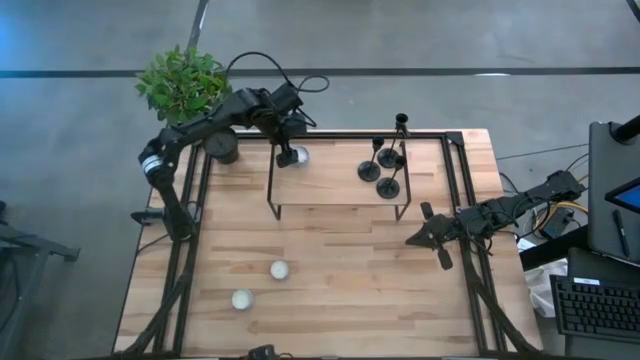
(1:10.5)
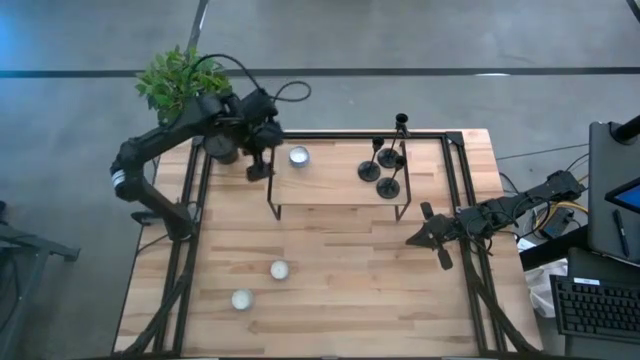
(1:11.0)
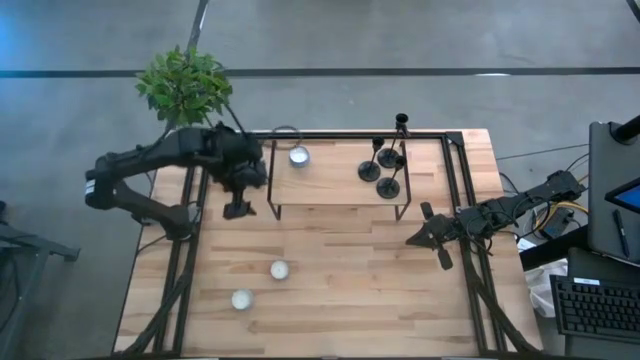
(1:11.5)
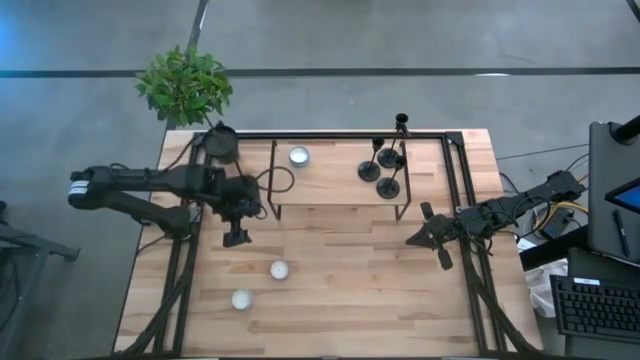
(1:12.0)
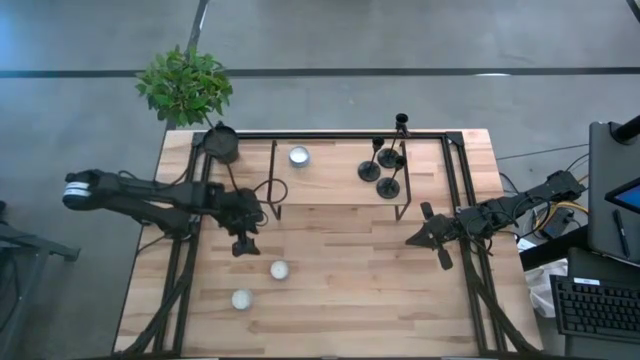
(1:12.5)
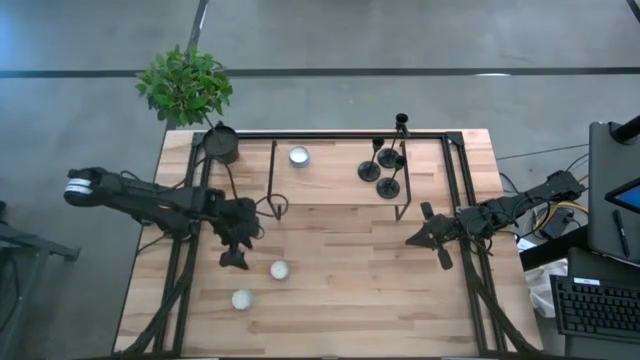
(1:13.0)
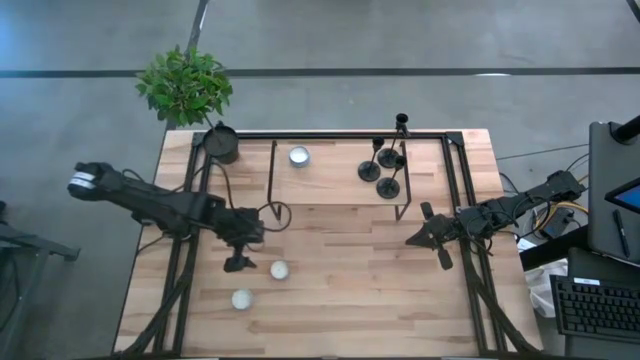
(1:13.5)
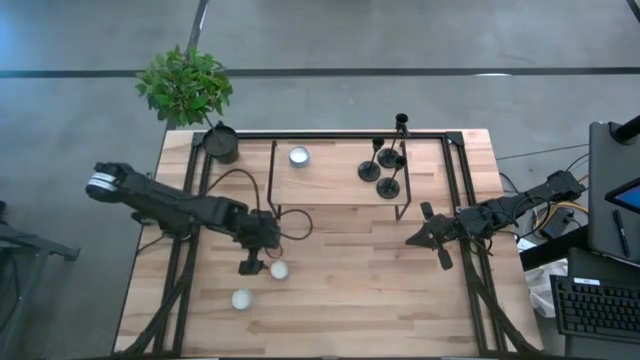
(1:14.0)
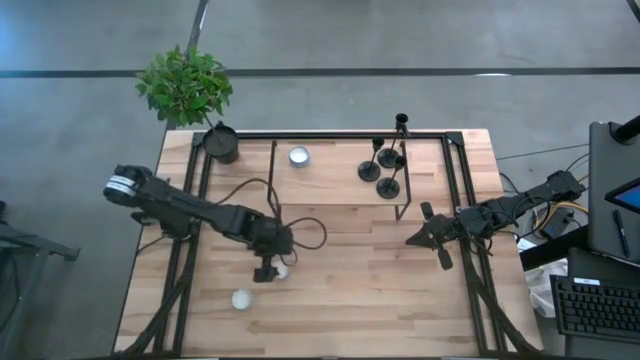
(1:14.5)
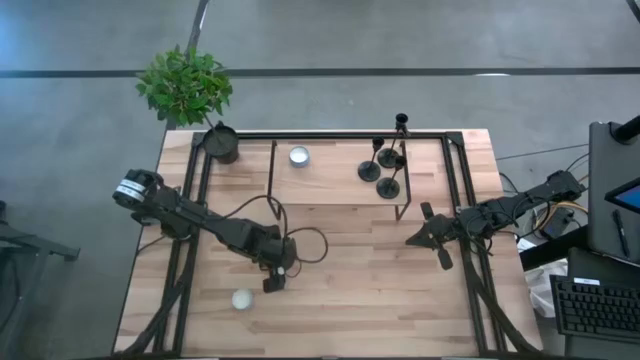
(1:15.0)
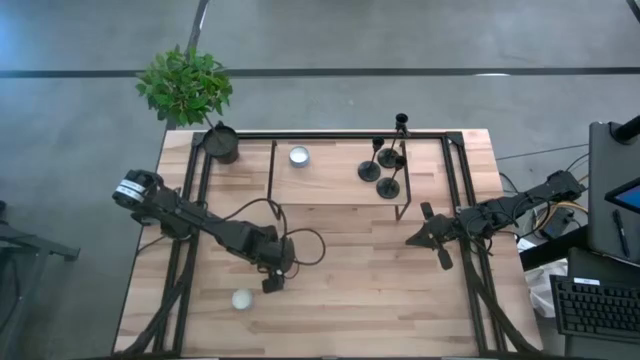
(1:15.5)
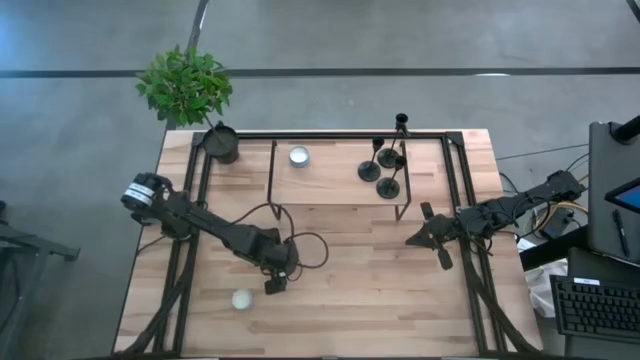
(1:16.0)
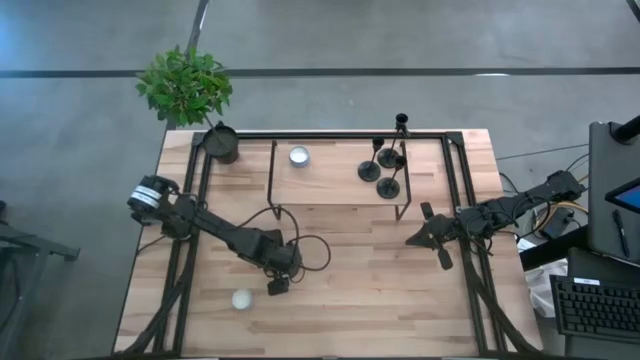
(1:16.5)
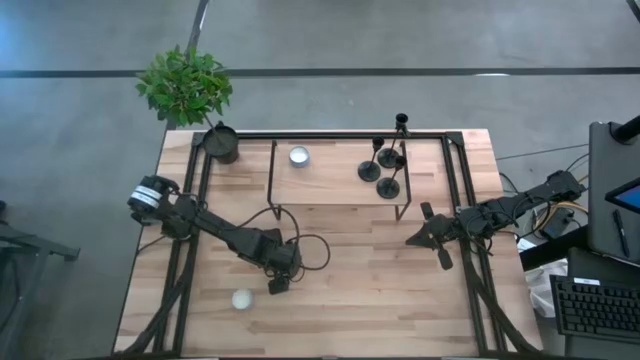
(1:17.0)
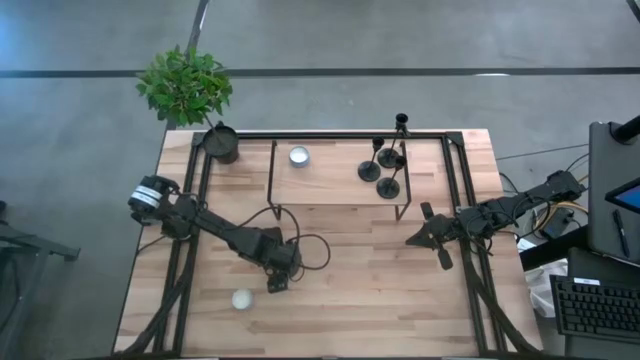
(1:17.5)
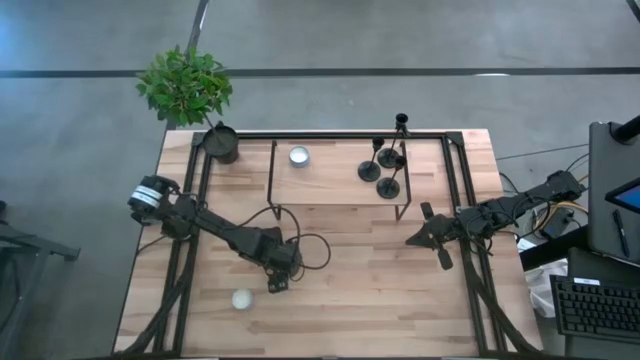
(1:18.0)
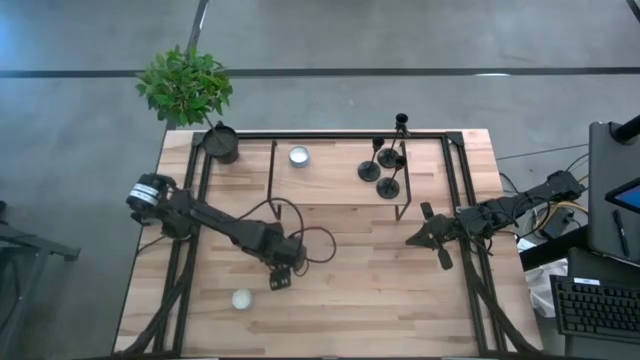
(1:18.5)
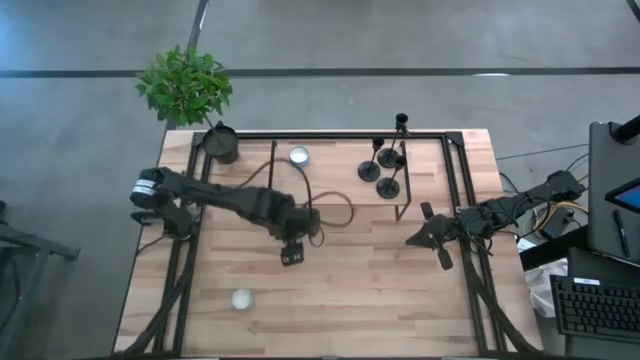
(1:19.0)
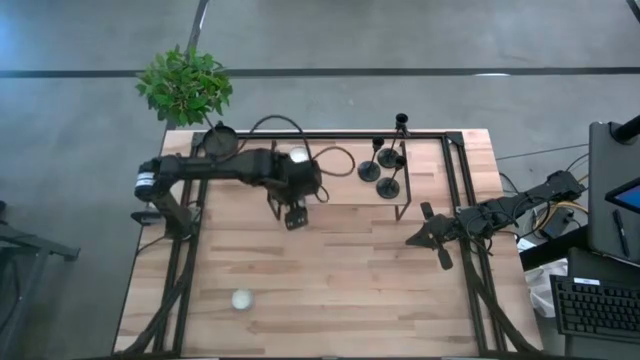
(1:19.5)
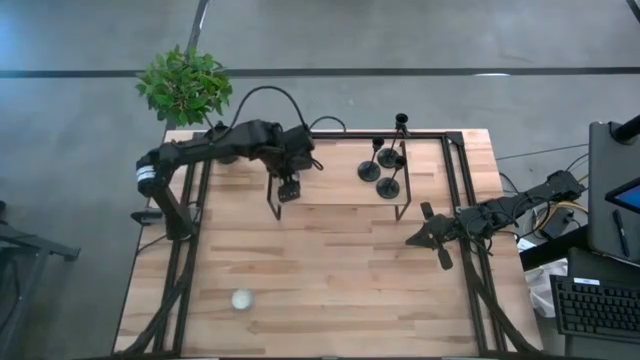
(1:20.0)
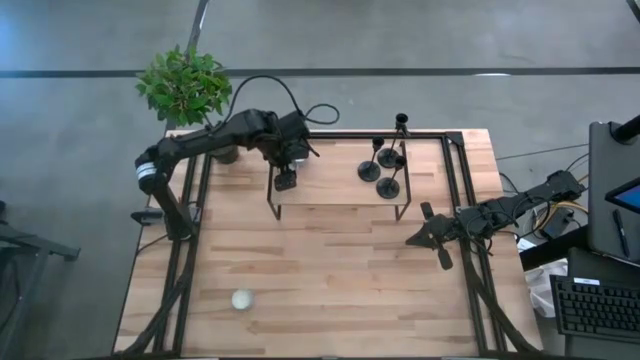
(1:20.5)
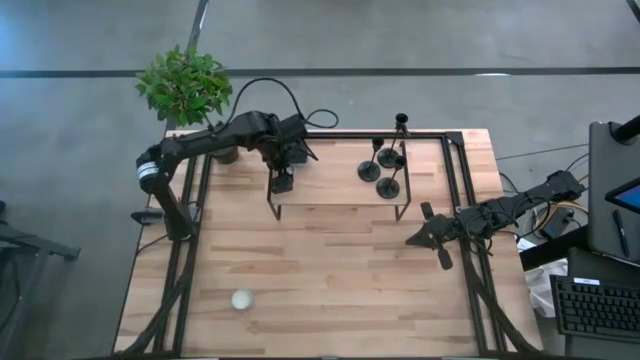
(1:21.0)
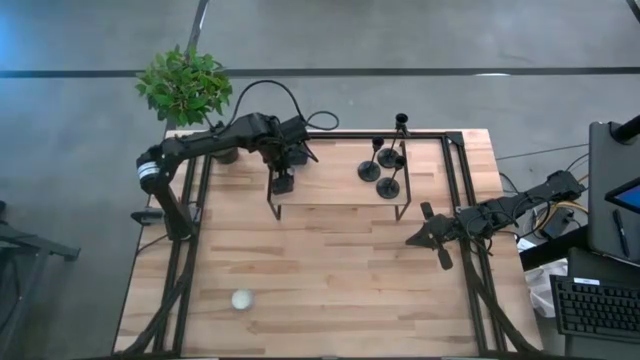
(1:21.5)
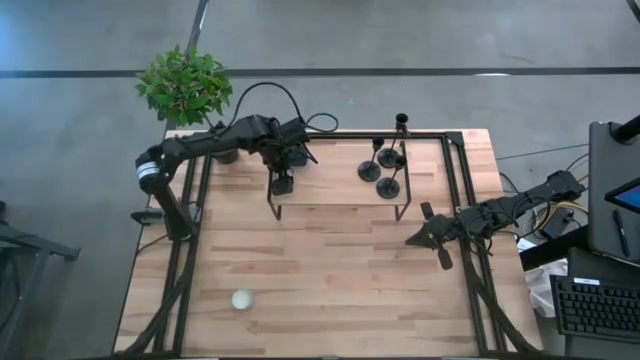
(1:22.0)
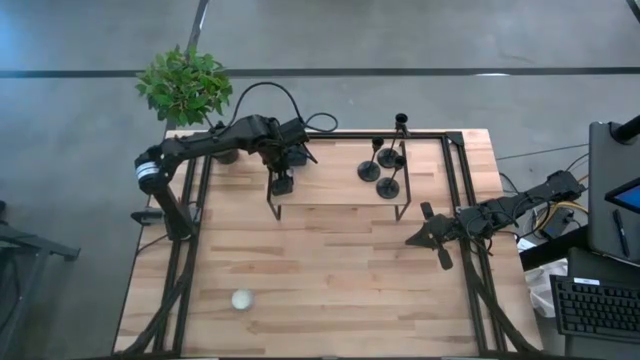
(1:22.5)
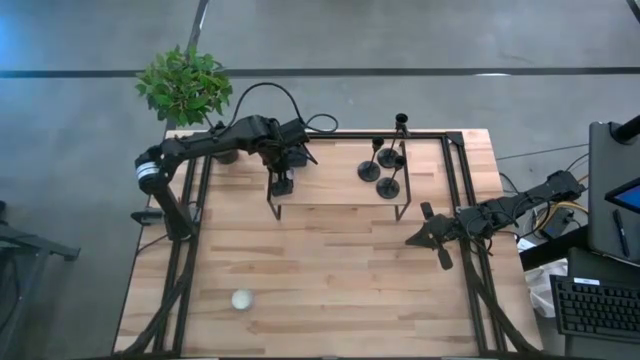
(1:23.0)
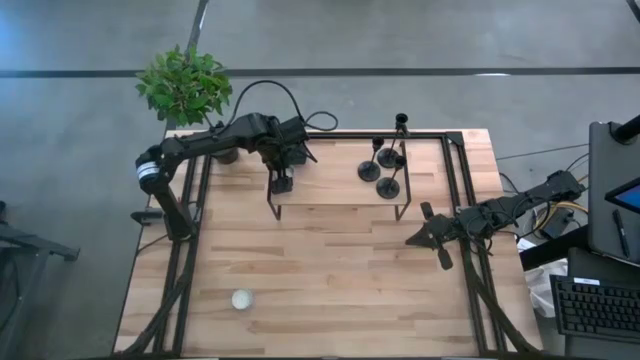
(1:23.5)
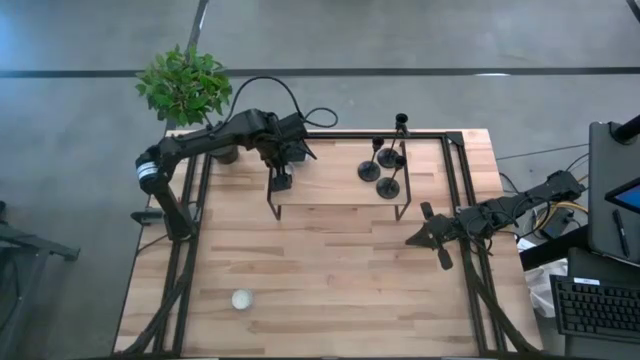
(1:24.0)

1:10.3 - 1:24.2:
Task: Pick & Place candle stick holders
Put the pink scented candle on the shelf
